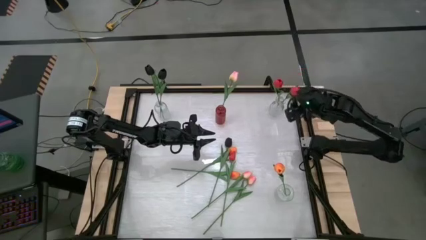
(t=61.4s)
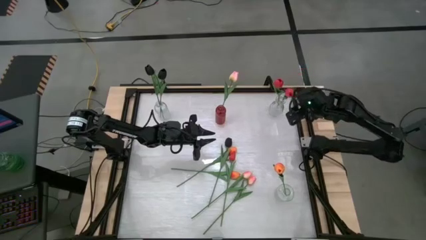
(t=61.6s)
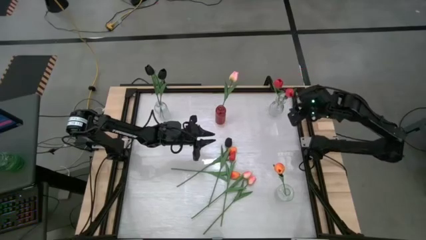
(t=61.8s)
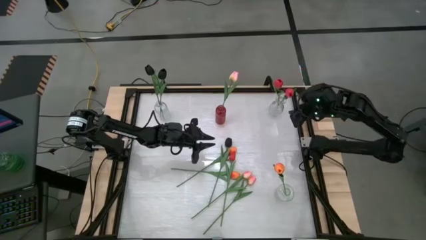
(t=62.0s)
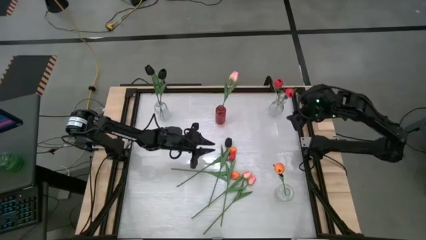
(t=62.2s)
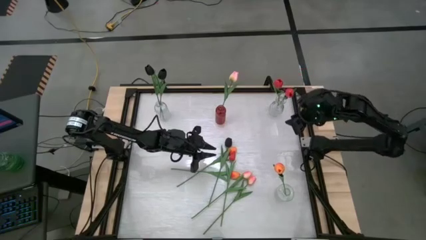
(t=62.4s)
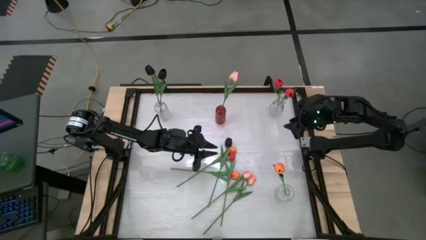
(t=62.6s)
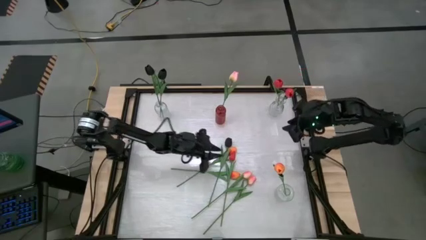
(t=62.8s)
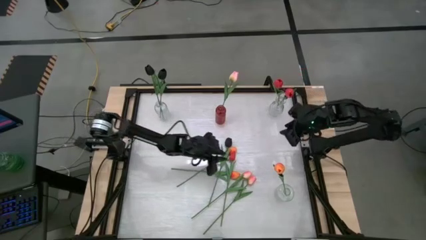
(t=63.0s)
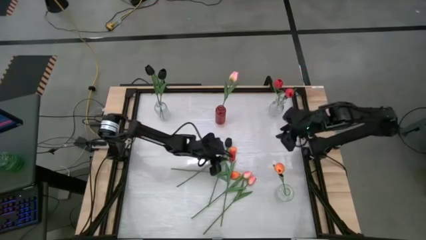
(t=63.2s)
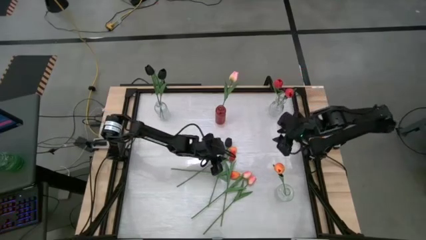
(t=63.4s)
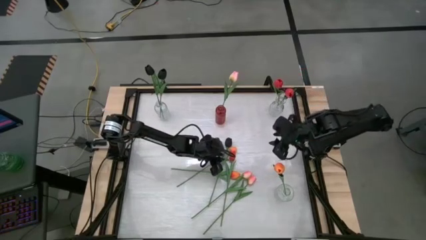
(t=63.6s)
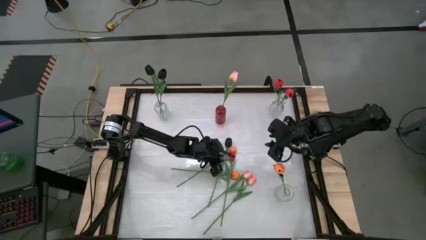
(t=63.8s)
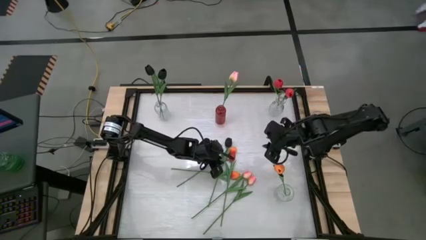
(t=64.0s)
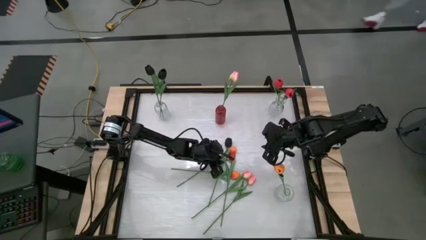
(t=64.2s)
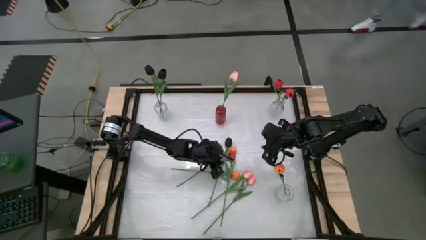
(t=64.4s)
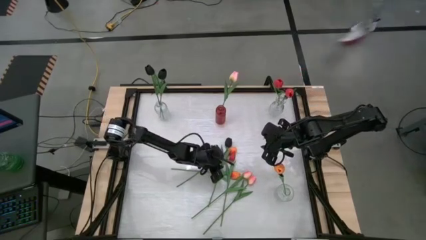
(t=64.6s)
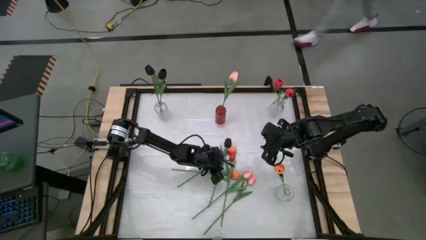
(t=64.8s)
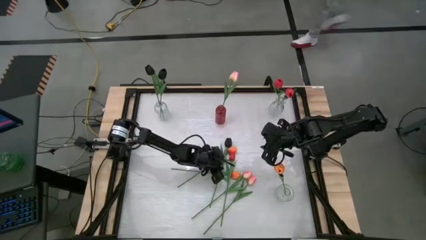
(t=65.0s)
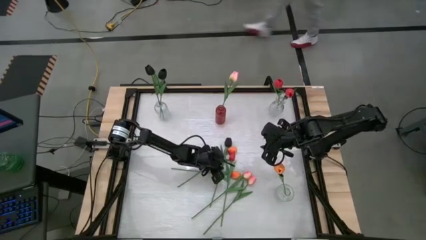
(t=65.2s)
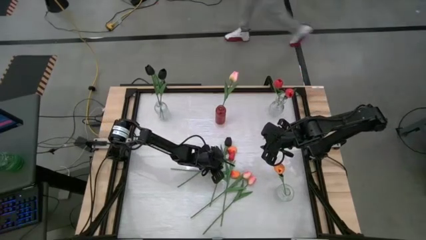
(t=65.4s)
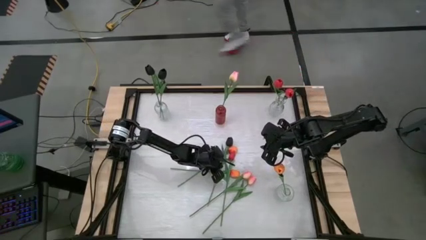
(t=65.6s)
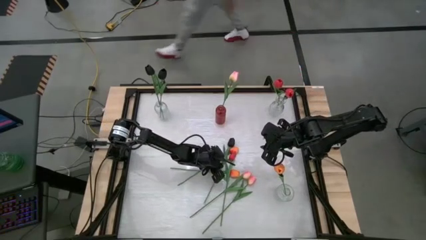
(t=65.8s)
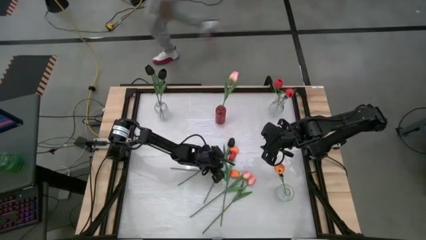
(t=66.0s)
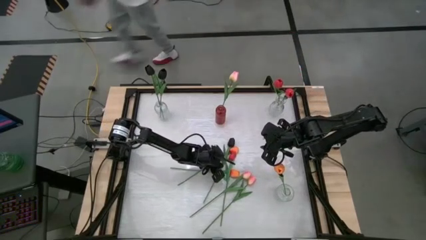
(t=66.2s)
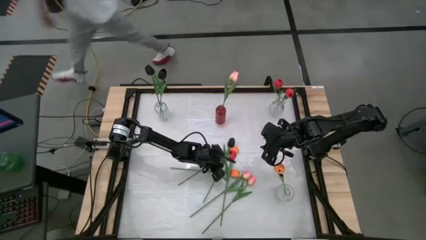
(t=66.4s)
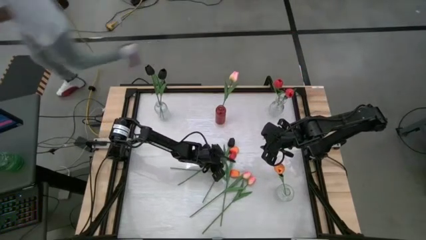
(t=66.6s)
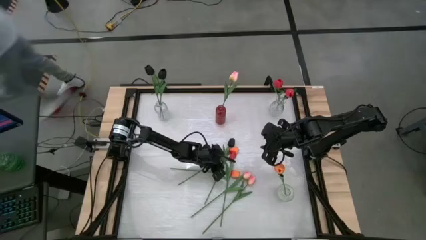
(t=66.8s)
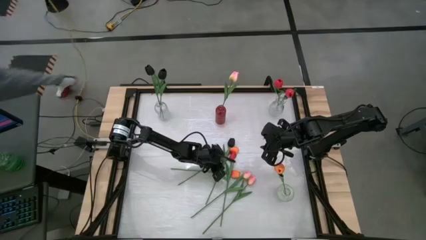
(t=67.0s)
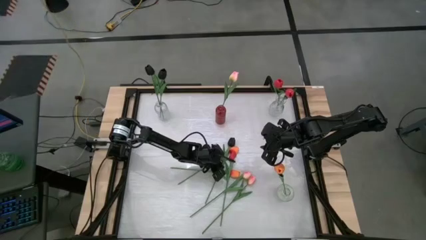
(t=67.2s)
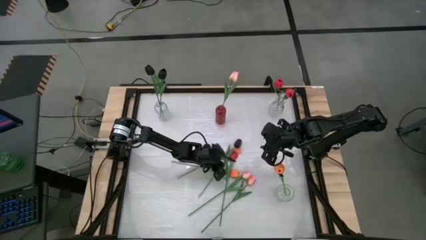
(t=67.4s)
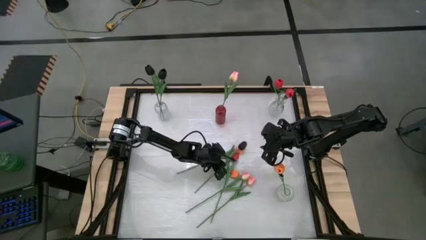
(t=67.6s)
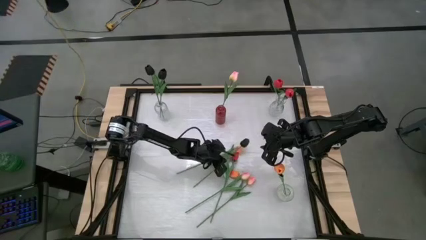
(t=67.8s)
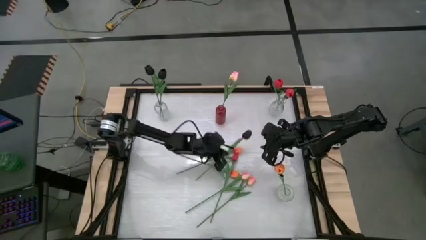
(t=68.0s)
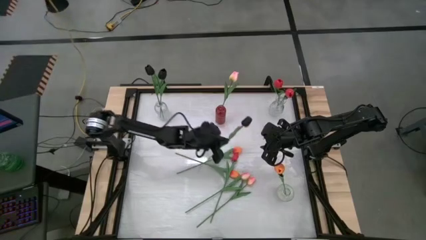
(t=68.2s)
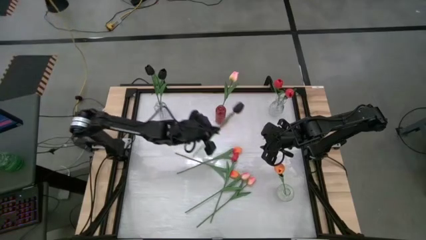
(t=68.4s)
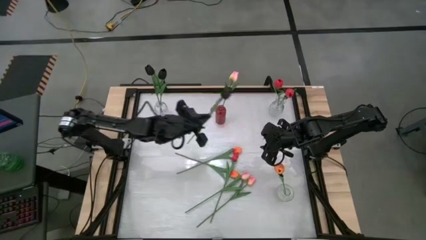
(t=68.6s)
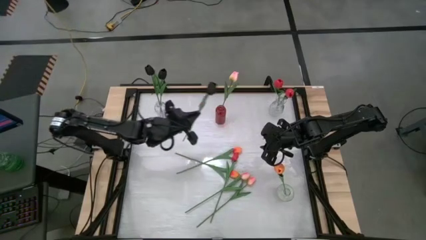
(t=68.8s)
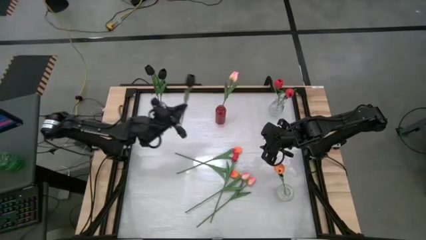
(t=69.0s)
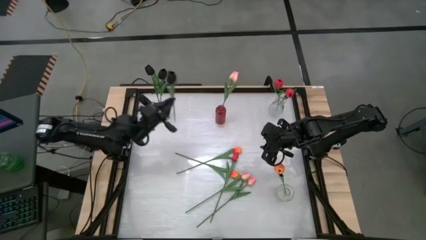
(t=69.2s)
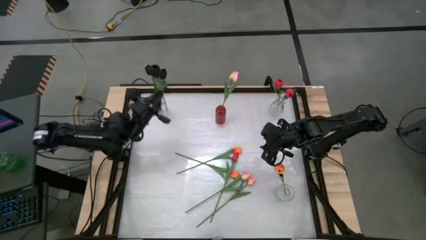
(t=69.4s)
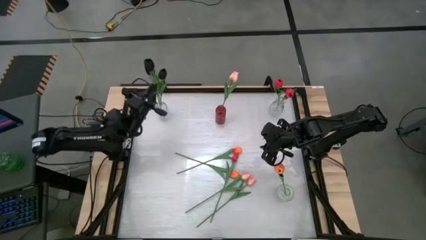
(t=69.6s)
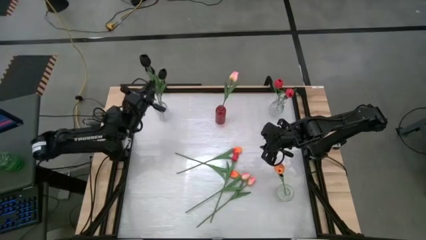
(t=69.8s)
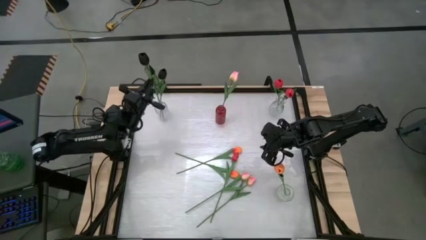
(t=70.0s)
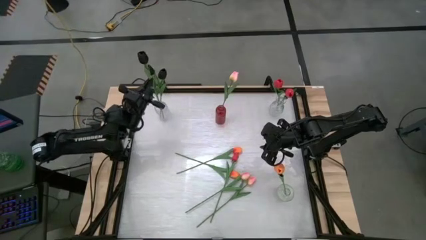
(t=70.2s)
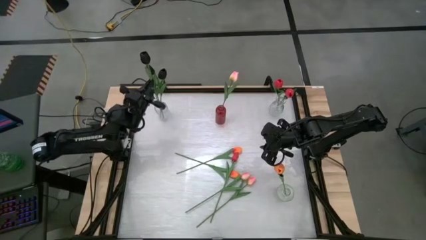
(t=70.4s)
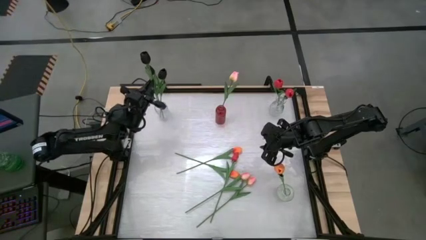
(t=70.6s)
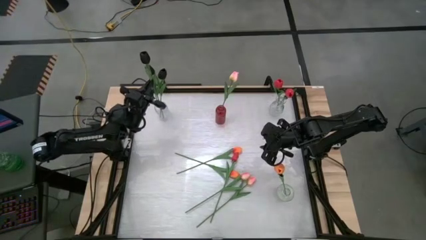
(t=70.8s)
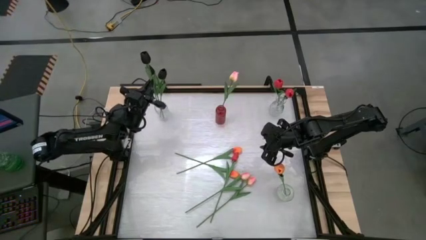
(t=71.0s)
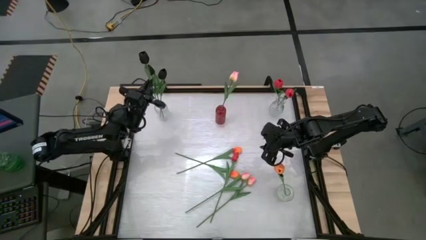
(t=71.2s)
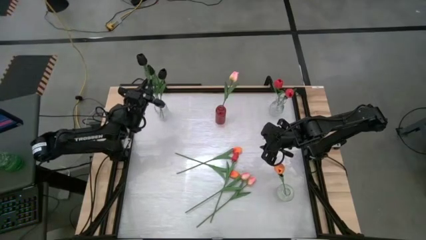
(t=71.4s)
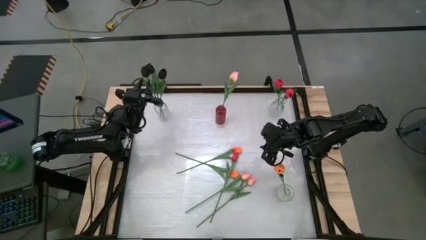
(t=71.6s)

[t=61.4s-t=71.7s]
Task: Sort flowers into vase by color
Put the black flower into the top left transparent vase
